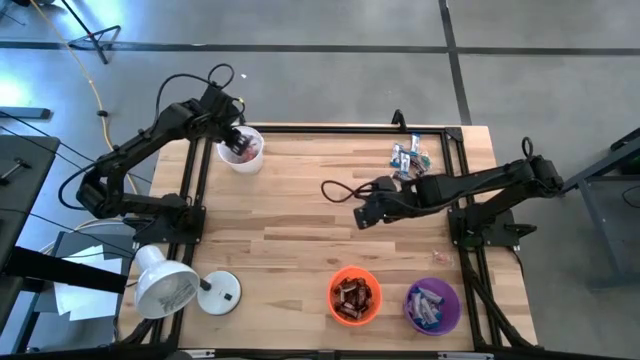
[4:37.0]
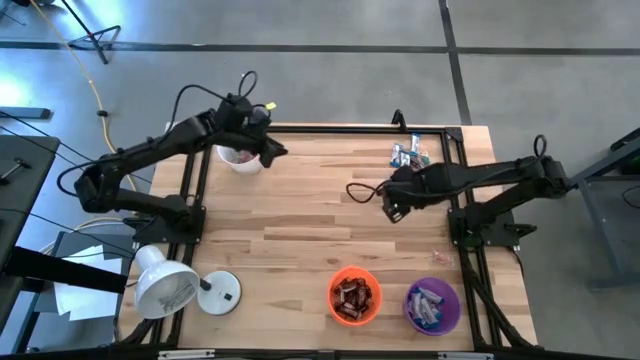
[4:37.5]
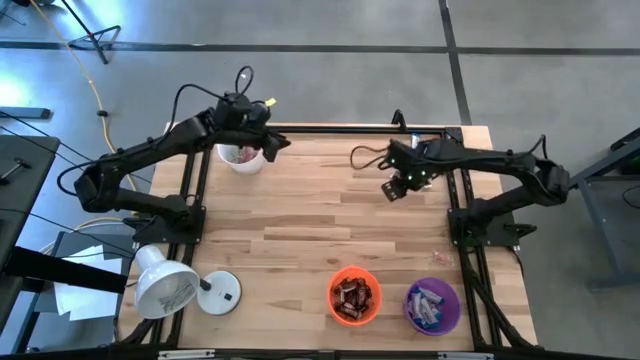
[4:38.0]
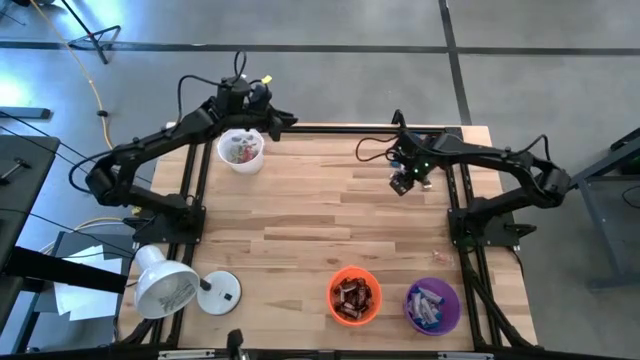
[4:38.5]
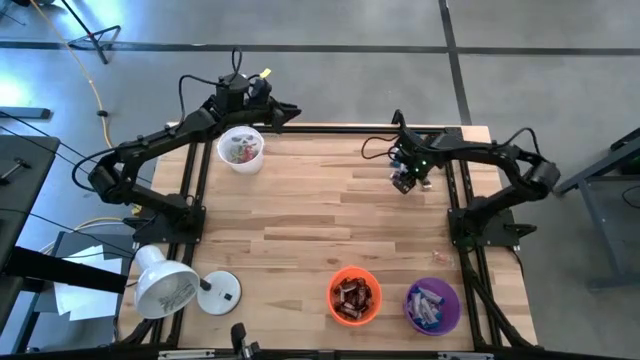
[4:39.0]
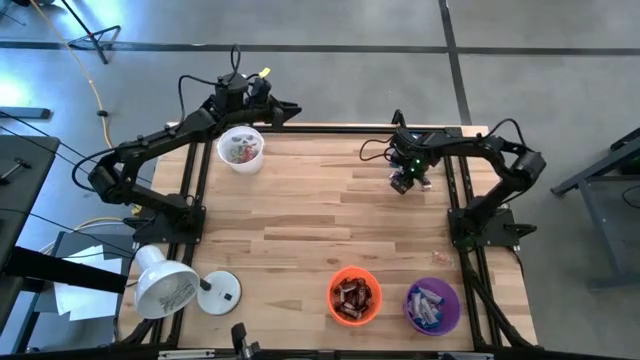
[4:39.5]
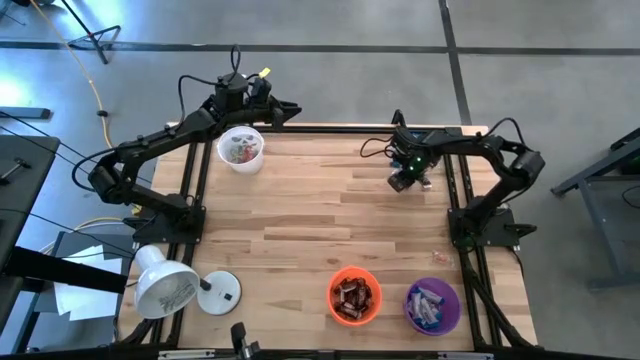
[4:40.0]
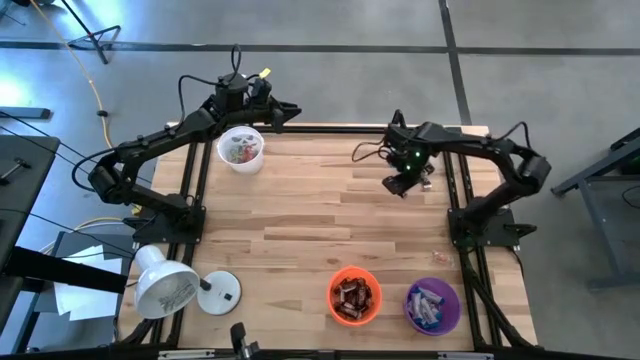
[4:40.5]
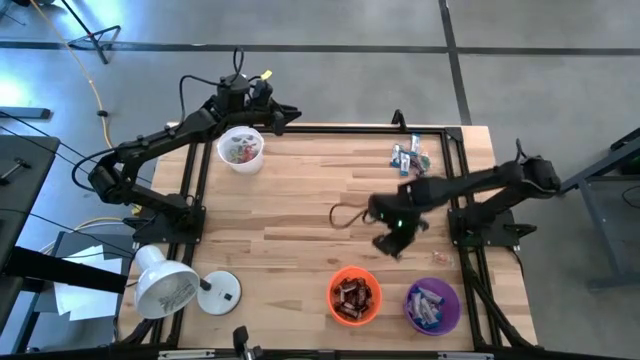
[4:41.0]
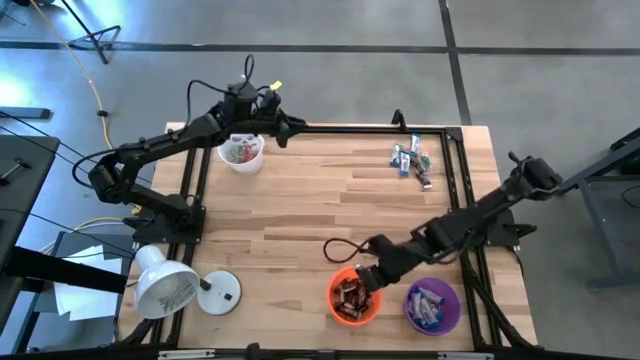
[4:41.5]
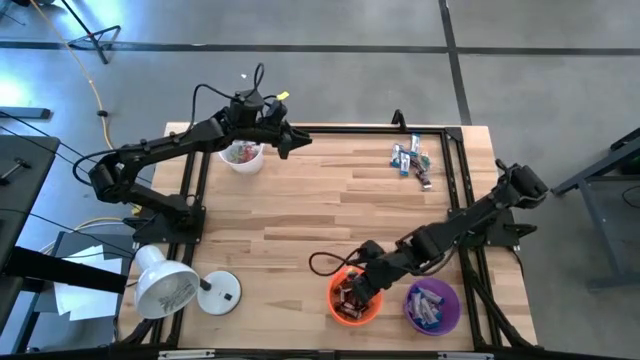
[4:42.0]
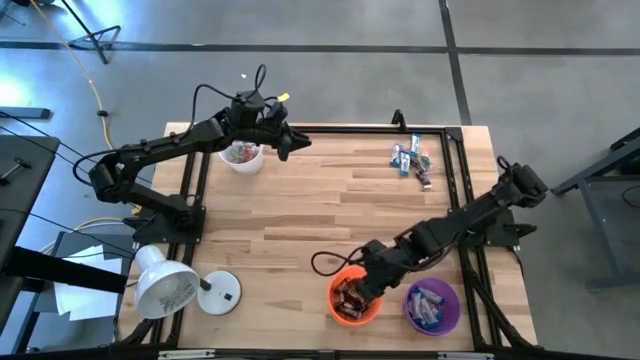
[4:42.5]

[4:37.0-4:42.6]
Task: Organize candy in baskets
Put the brown chocolate into the orange bucket

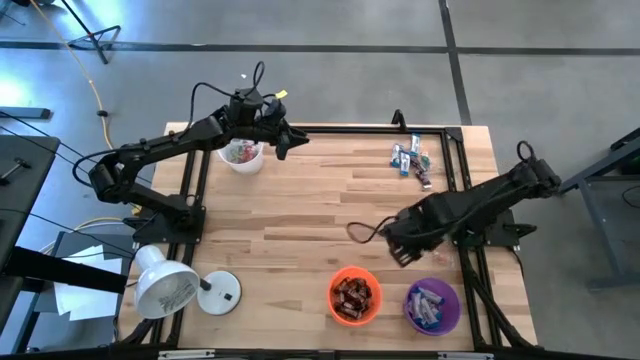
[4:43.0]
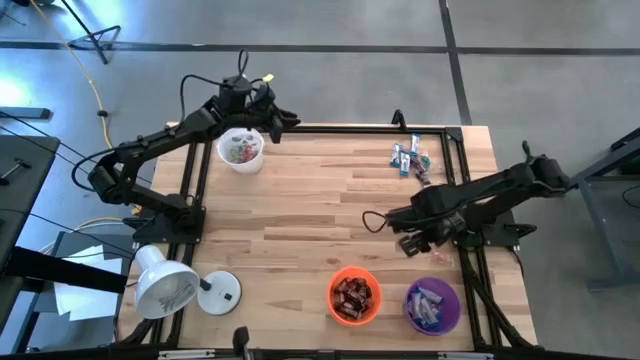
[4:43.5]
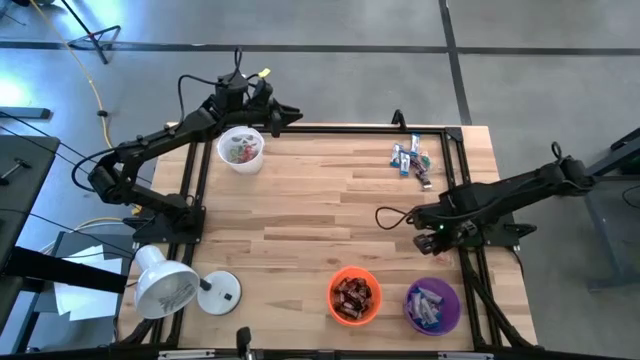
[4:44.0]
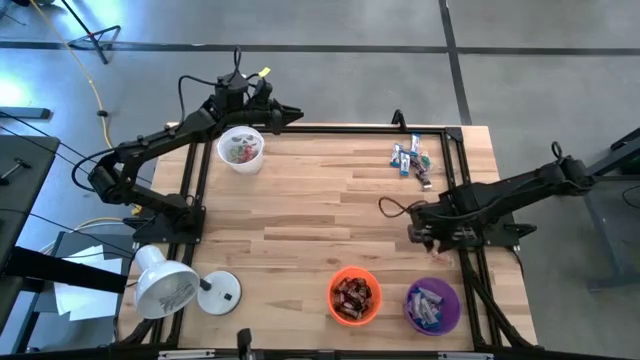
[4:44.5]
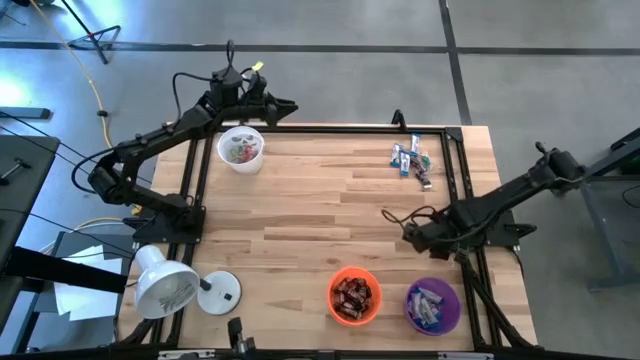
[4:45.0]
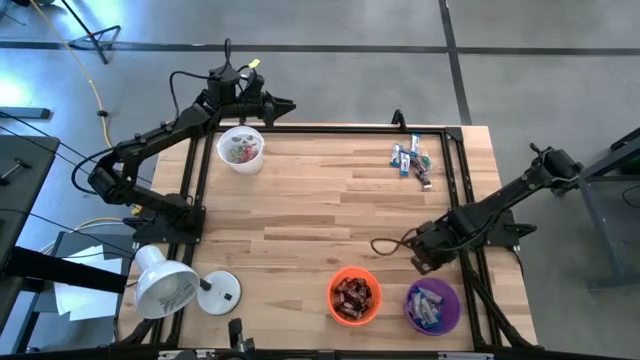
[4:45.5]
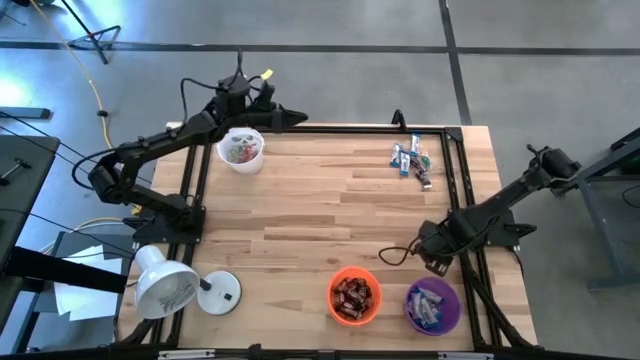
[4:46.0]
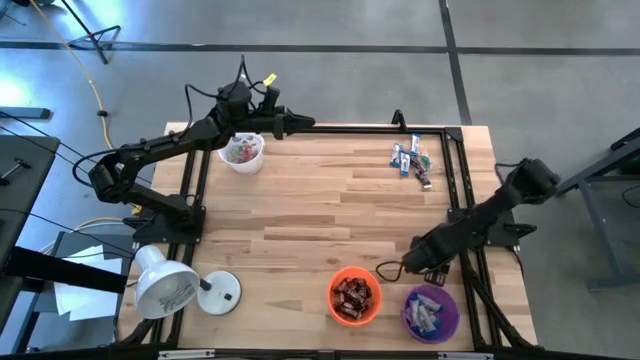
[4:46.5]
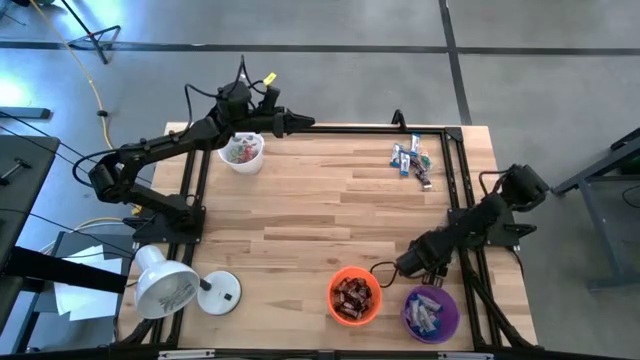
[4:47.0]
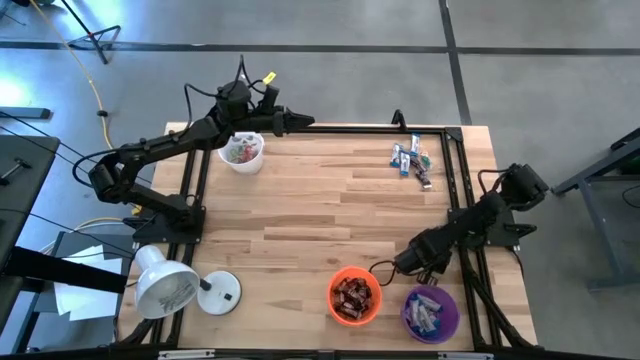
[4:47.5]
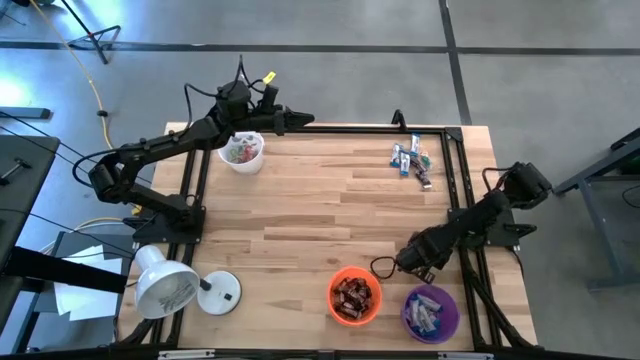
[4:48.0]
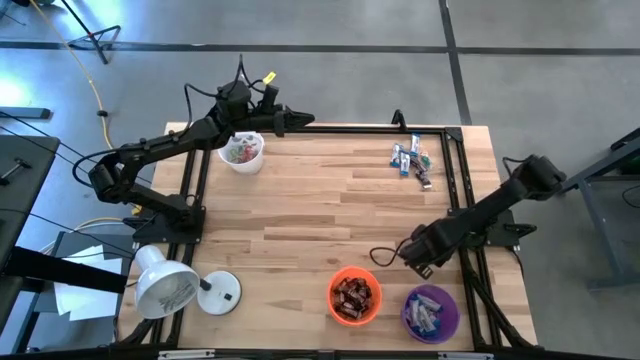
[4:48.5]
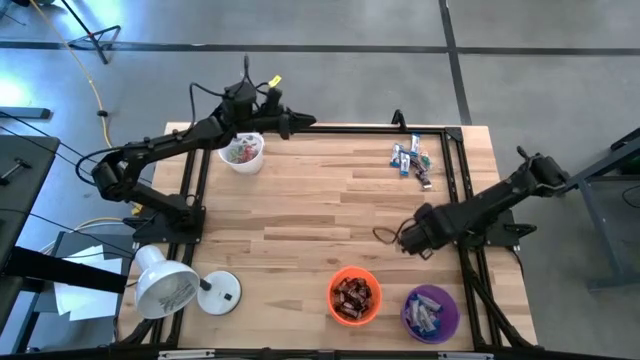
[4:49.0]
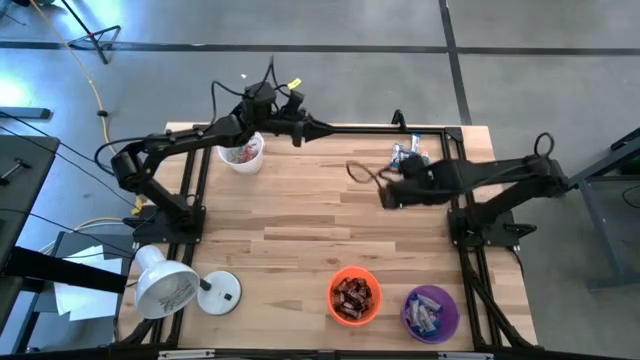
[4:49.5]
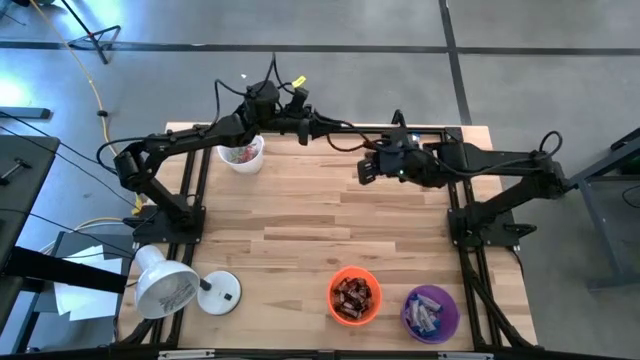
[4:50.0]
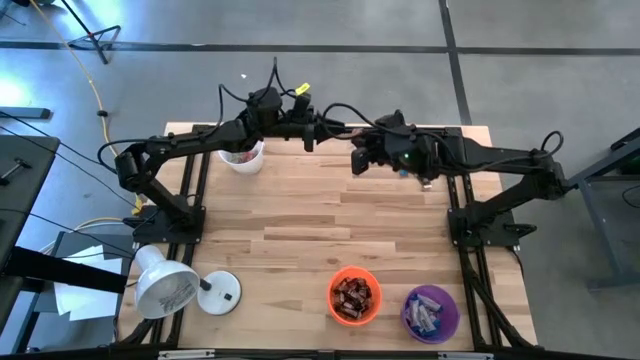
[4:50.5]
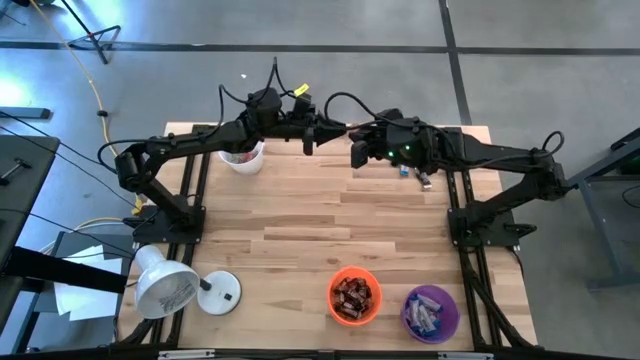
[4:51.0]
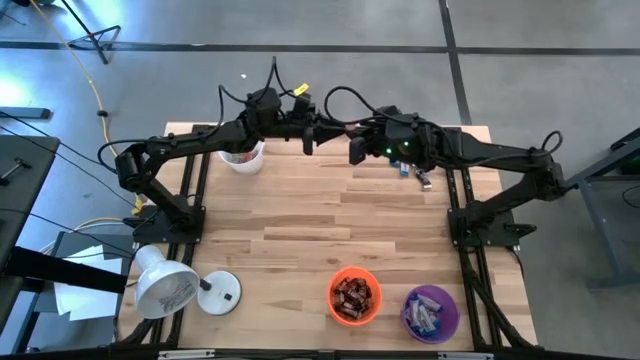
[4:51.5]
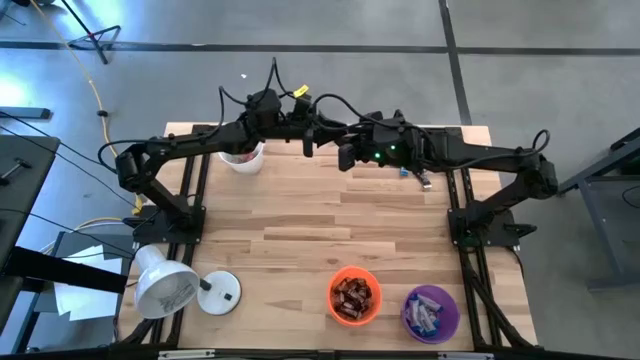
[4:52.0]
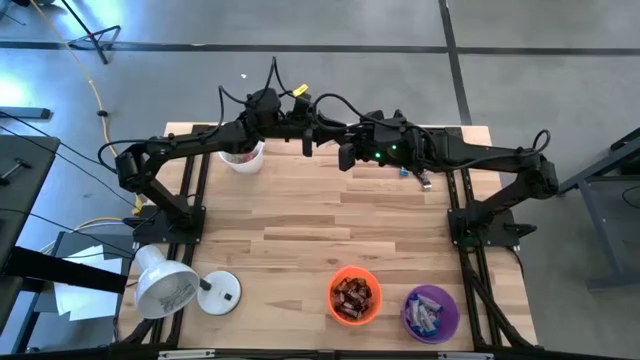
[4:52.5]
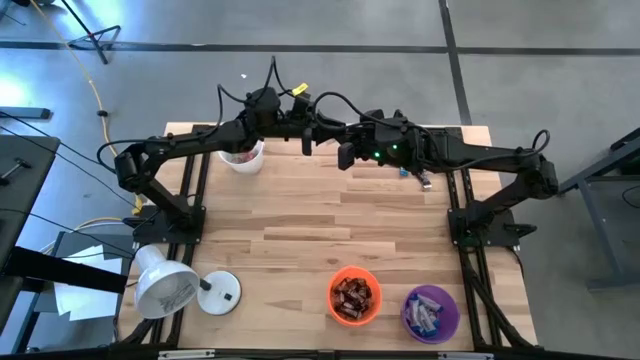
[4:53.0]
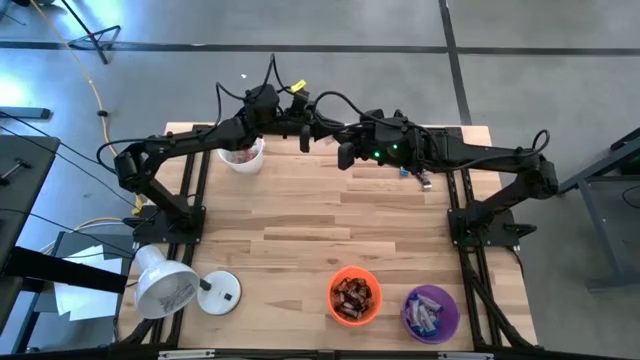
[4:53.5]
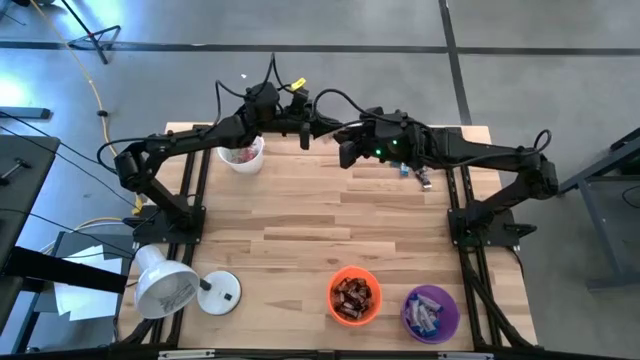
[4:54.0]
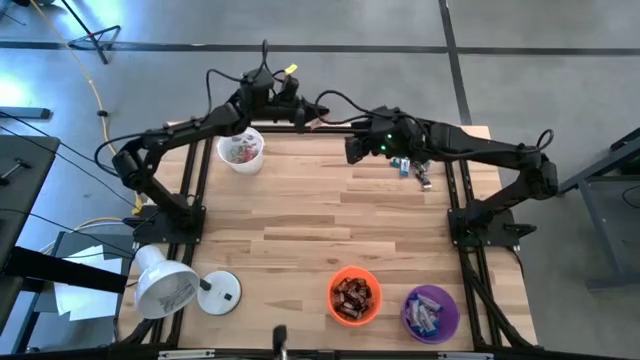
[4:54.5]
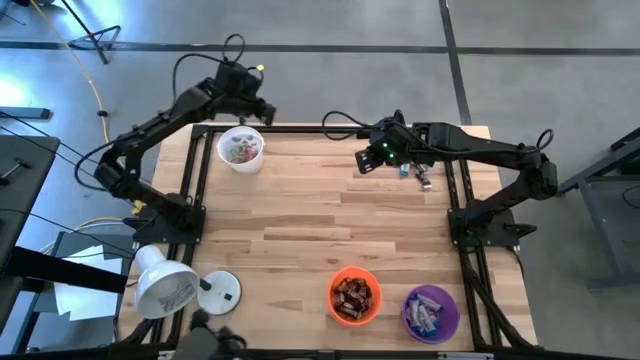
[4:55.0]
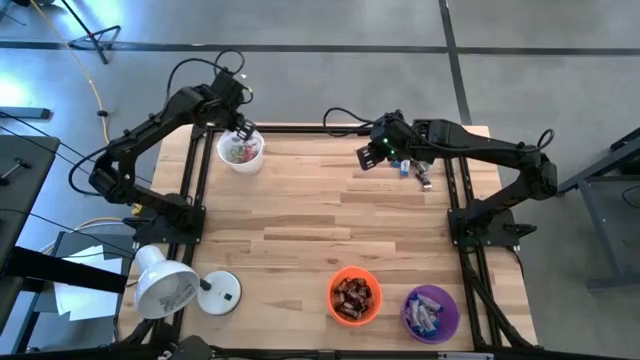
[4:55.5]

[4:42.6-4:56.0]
Put the orange gummy into the white bucket

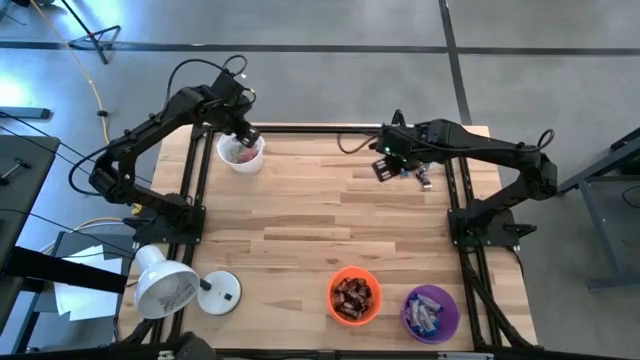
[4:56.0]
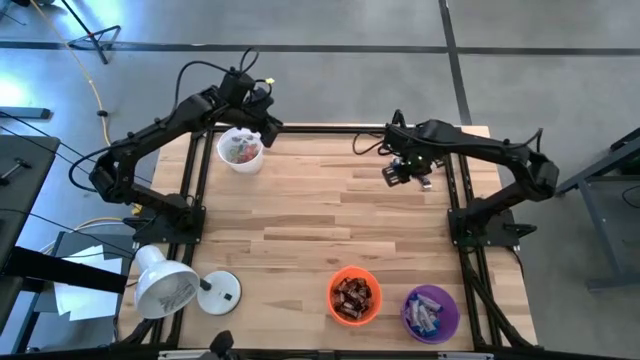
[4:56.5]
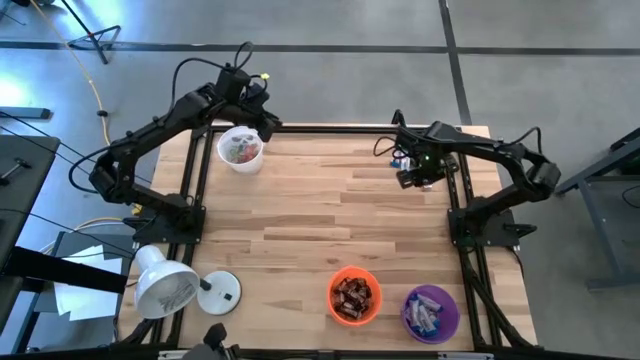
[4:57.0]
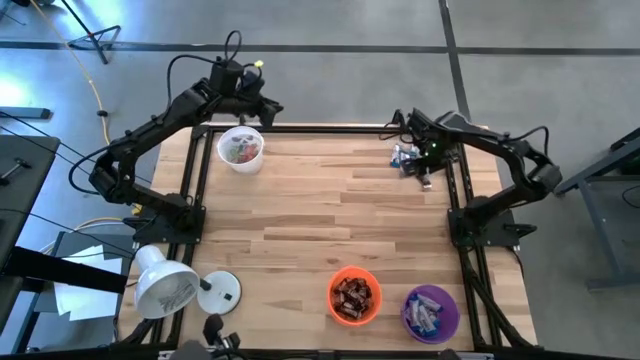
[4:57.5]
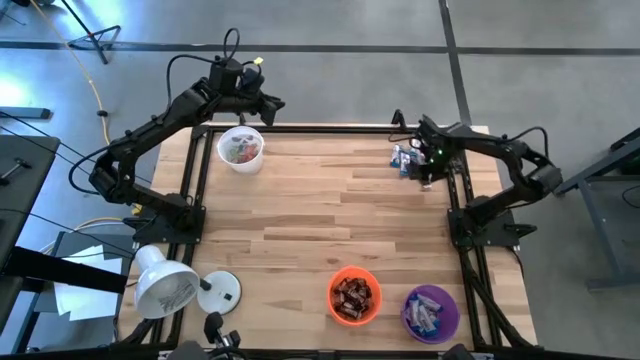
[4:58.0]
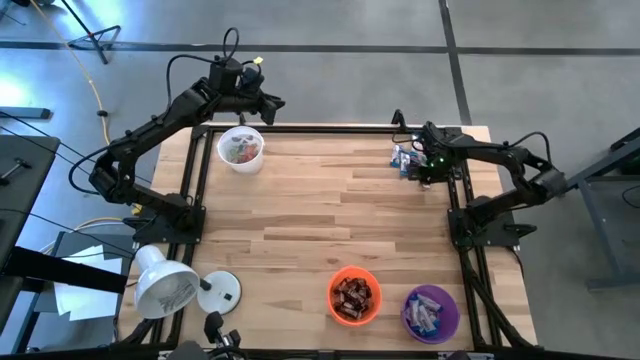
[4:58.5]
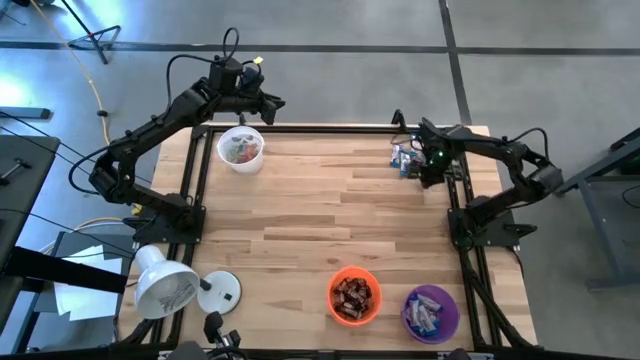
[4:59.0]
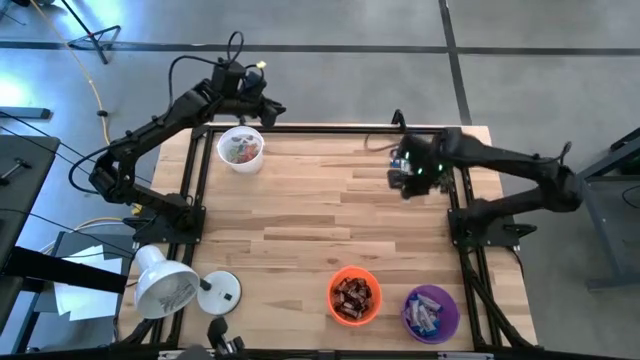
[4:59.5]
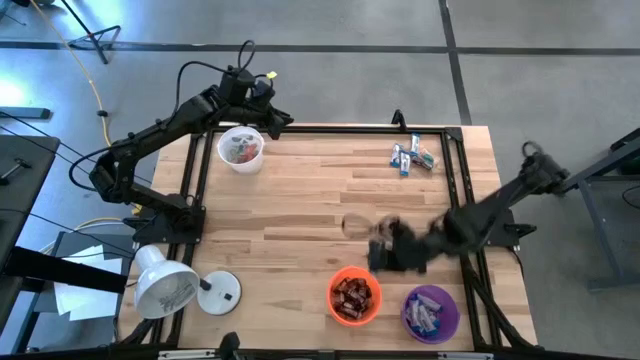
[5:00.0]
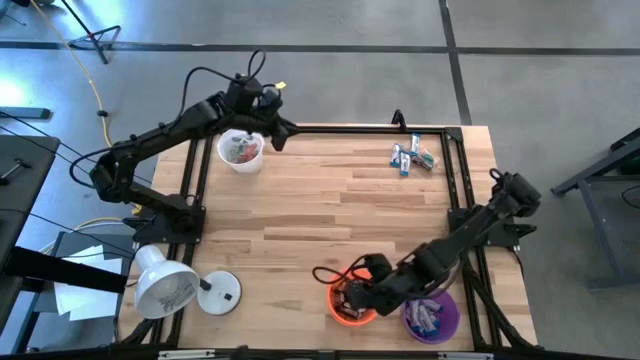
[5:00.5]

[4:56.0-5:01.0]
Put the brown chocolate into the orange bucket
